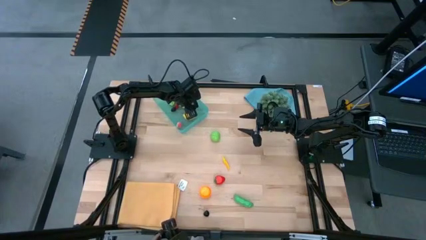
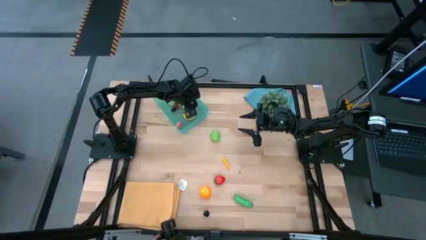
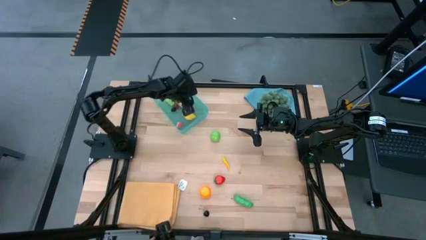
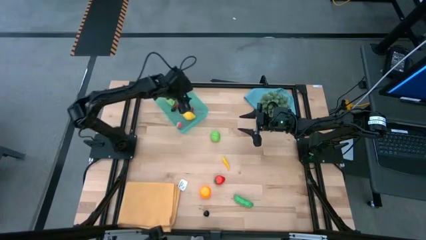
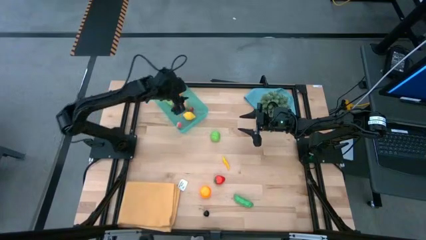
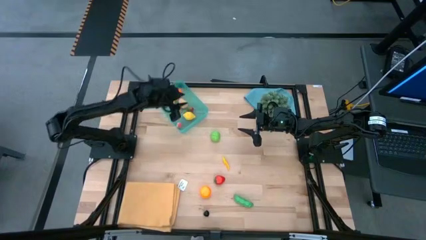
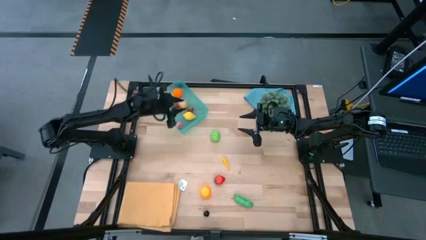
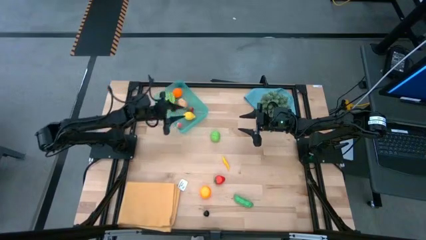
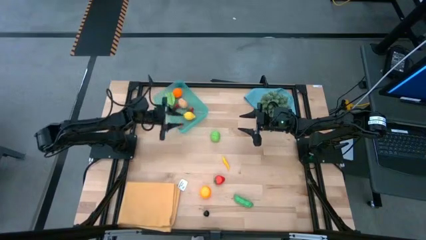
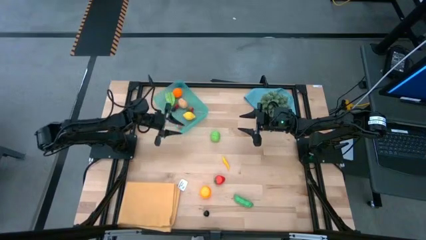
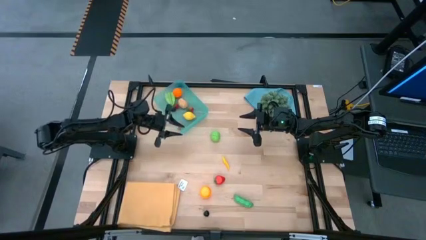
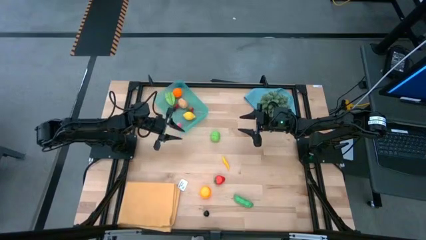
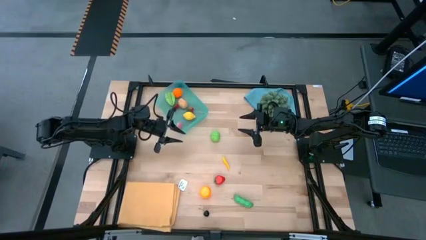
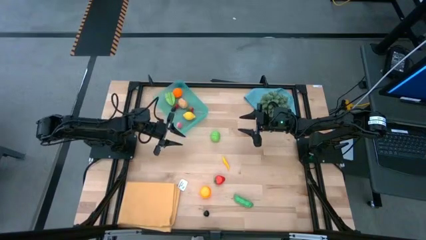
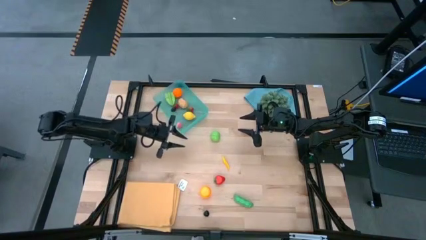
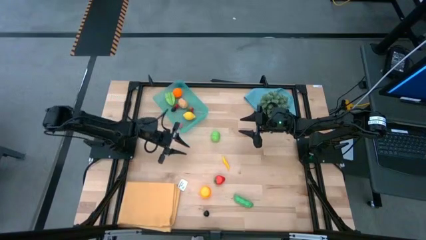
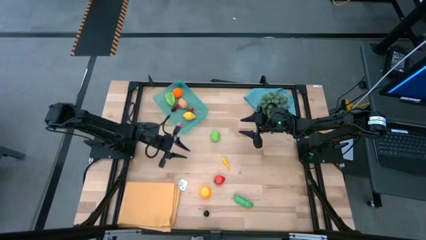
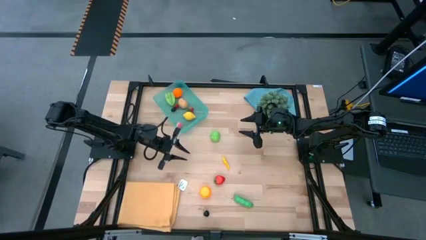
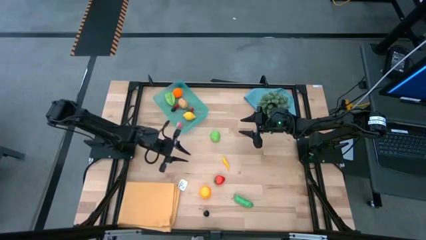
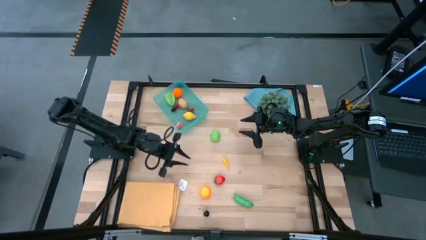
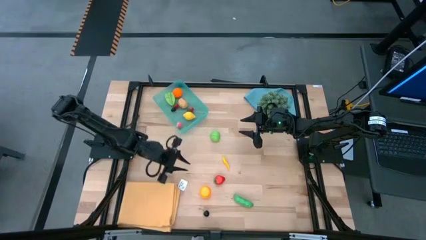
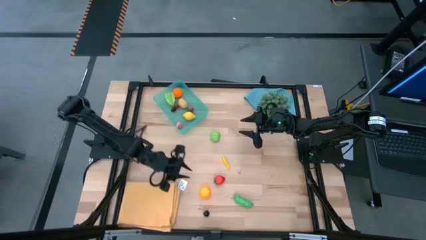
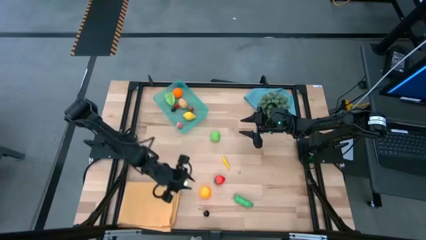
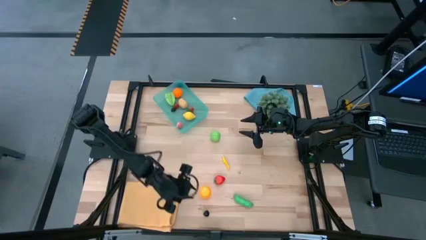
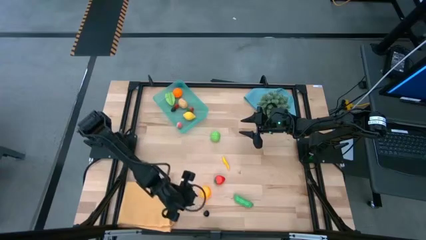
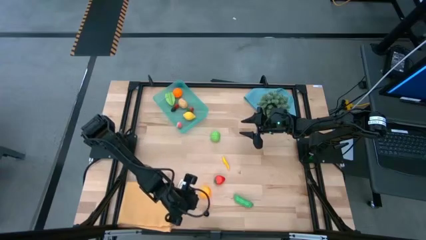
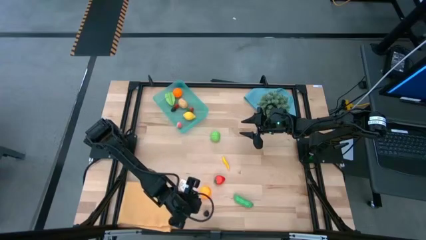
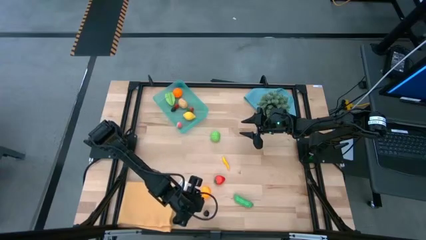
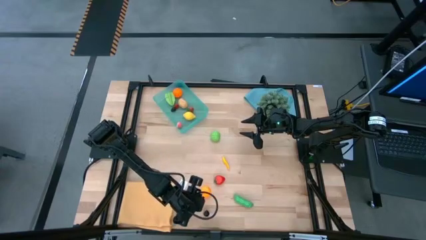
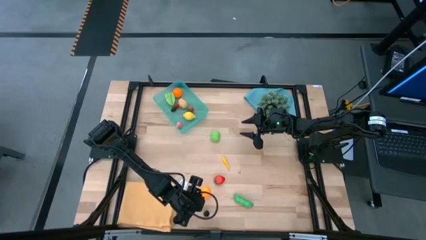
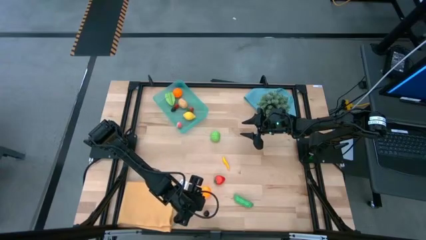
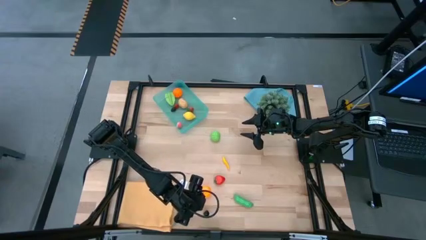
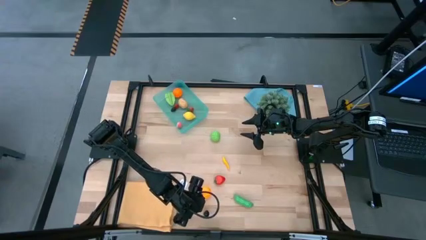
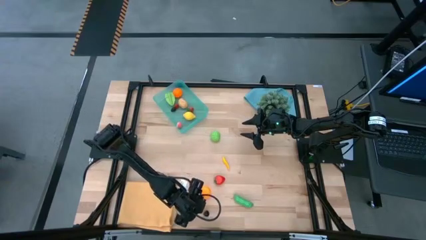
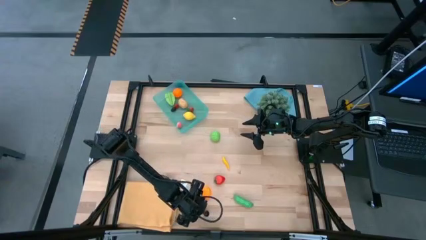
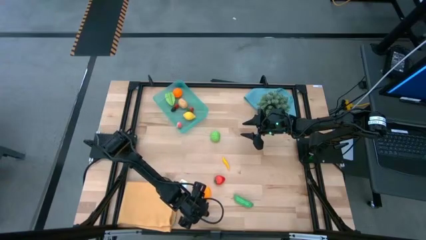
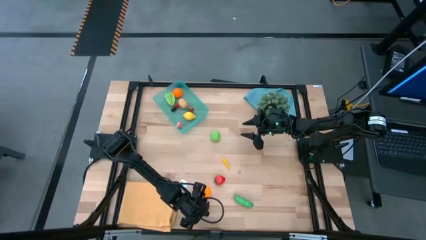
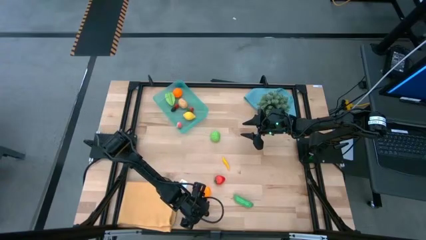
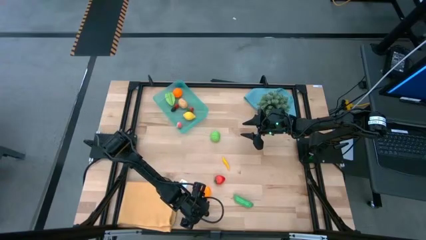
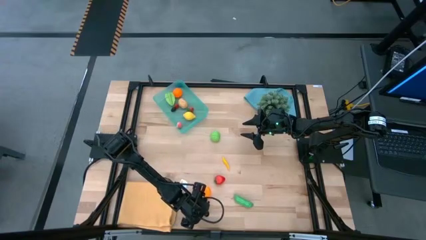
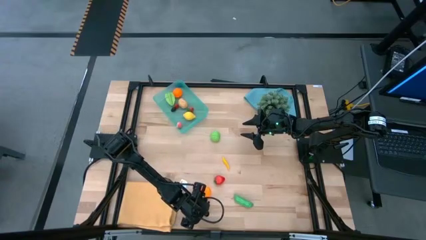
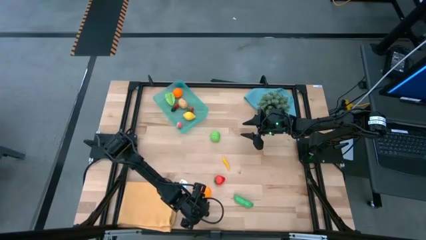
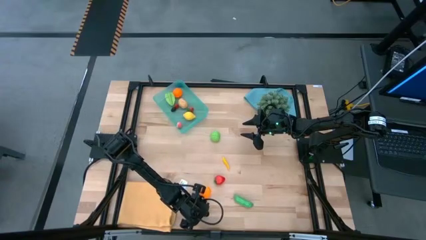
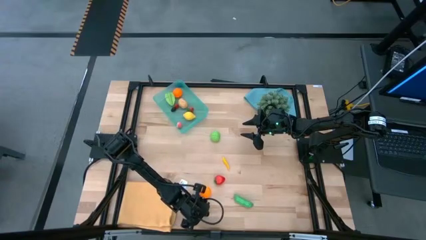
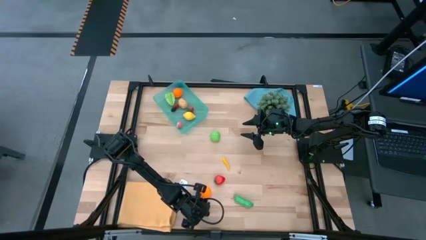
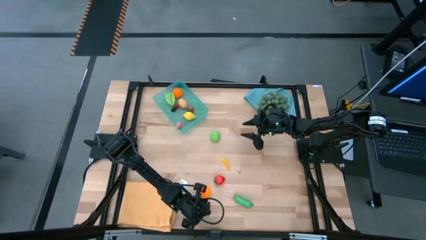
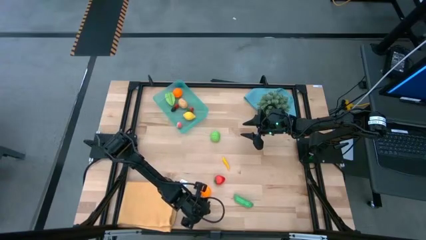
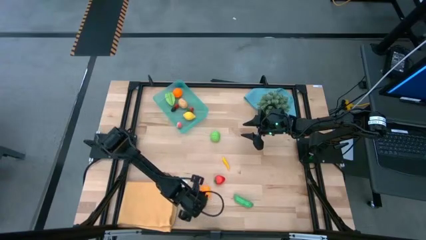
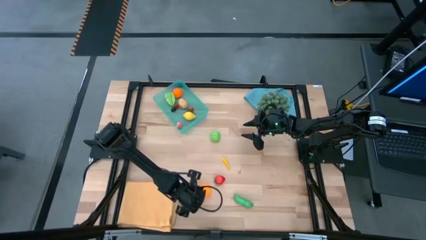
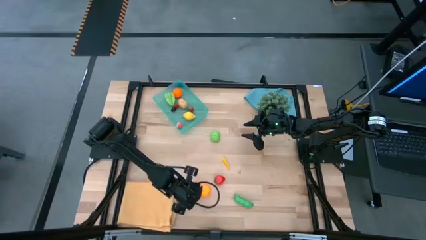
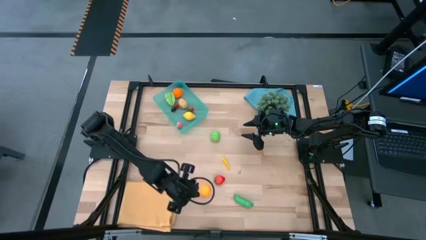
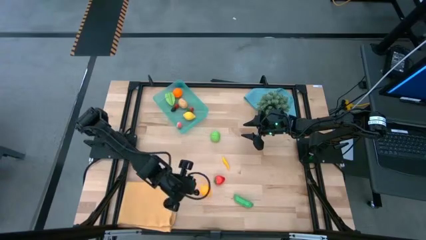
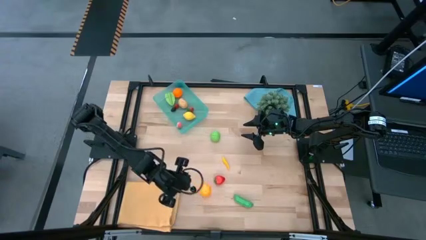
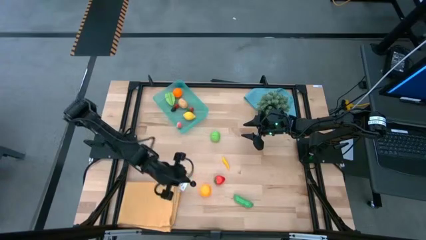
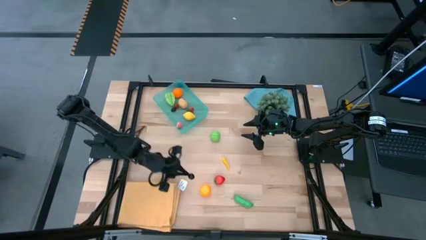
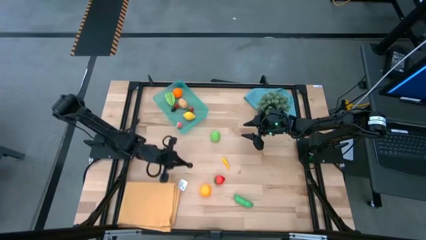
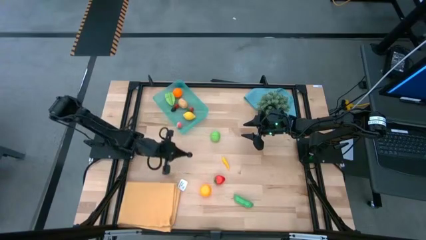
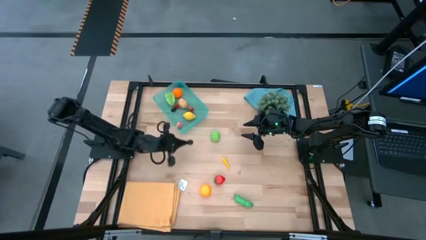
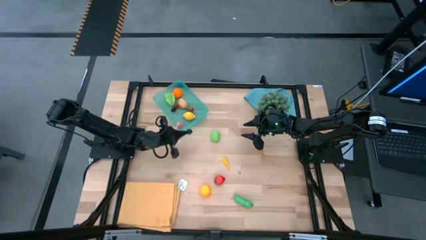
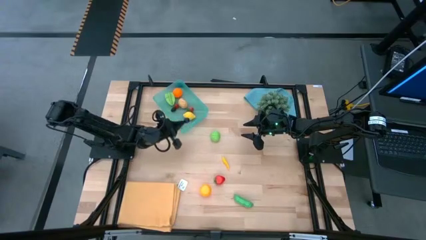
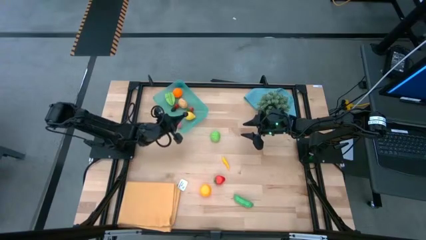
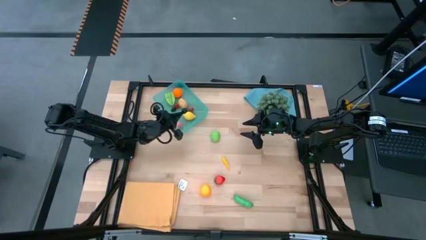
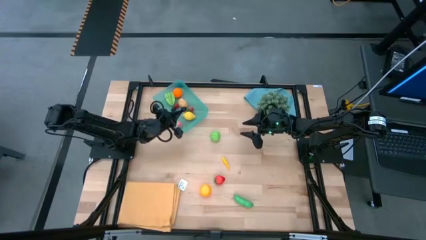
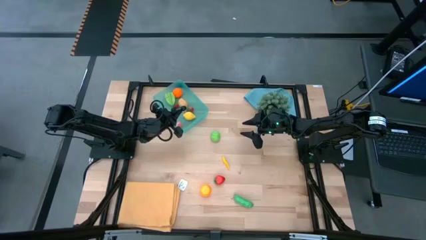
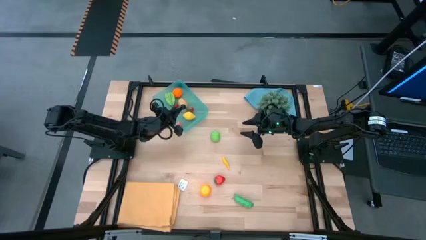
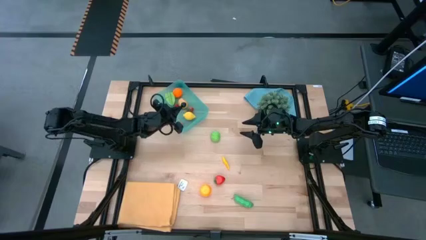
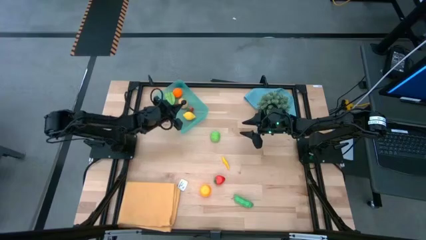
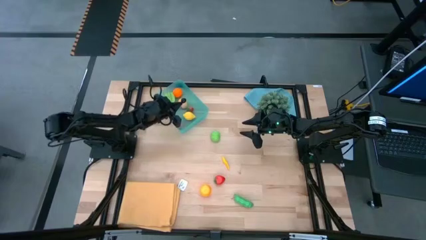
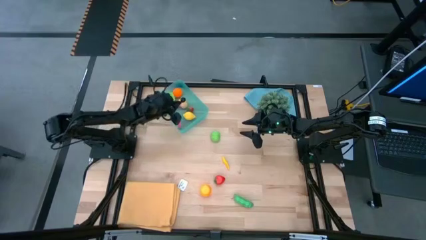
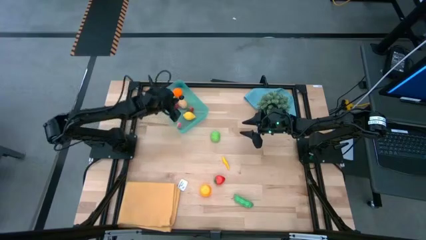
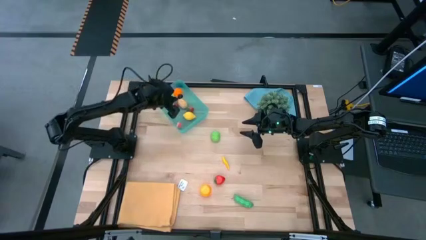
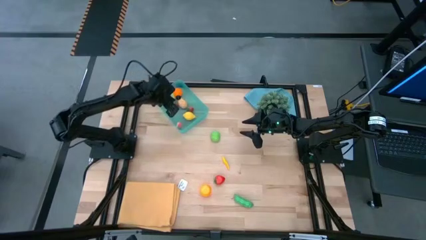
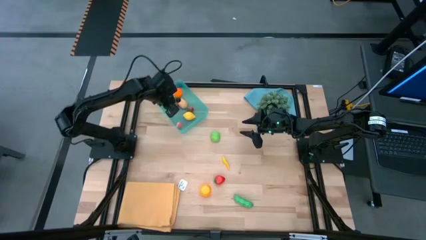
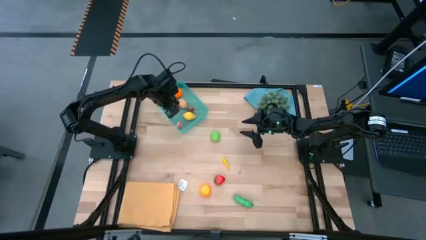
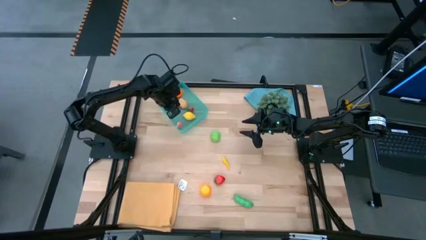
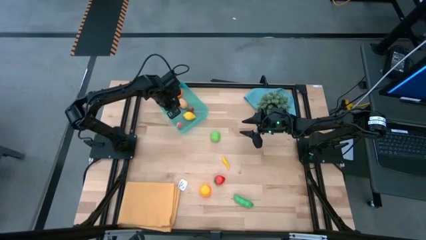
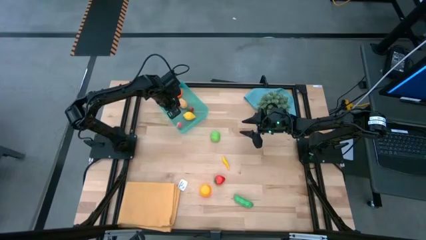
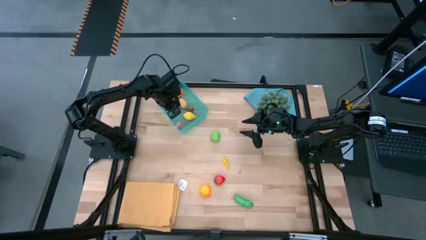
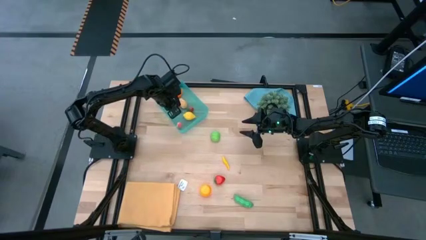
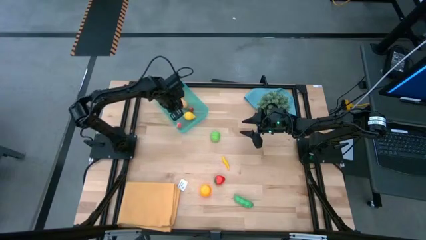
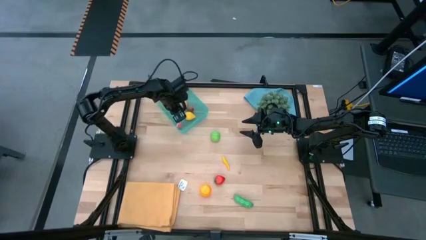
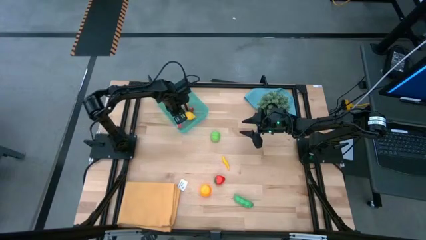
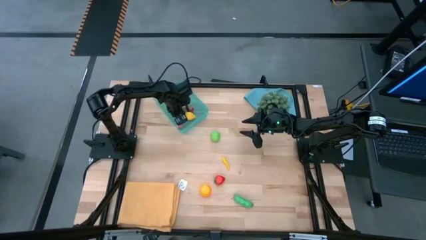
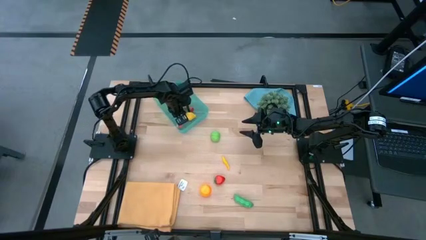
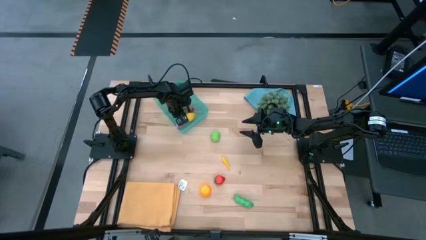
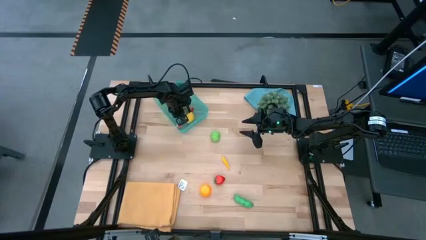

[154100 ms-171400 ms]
Task: Pick and placing Produce into tupperware
Put the black plum into the blue bin
